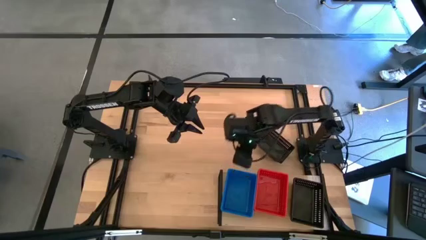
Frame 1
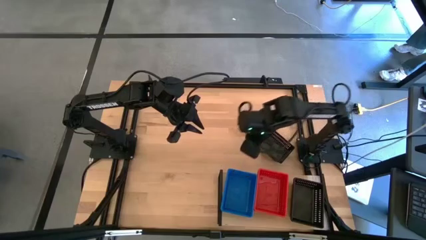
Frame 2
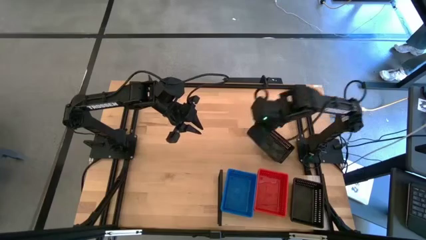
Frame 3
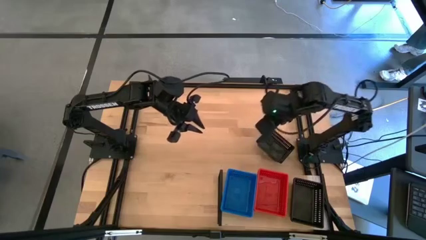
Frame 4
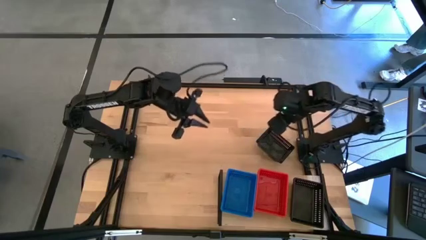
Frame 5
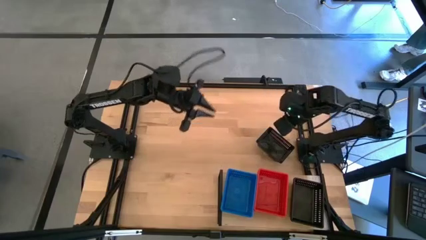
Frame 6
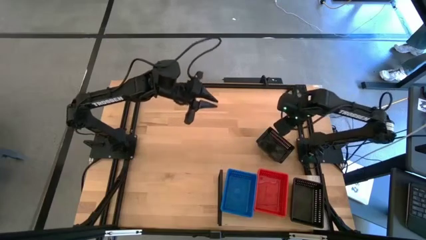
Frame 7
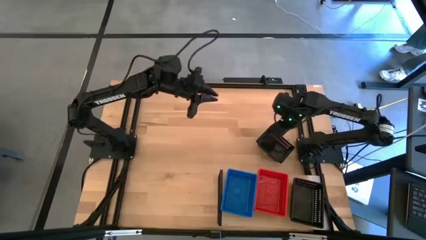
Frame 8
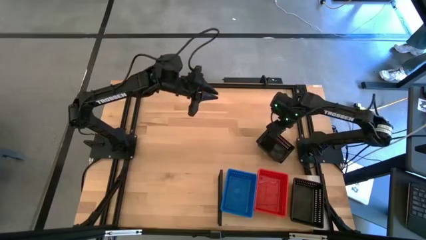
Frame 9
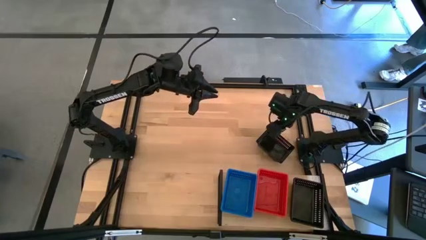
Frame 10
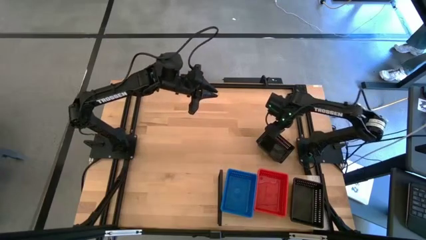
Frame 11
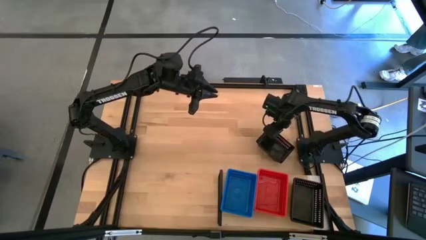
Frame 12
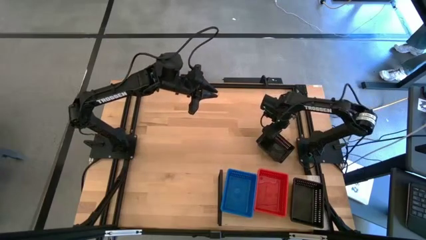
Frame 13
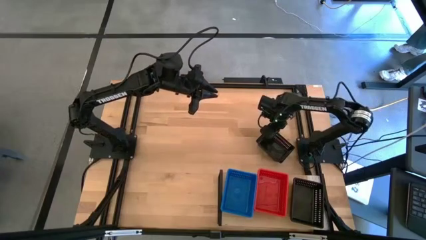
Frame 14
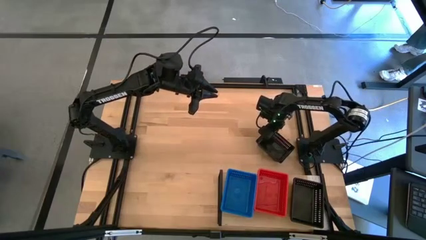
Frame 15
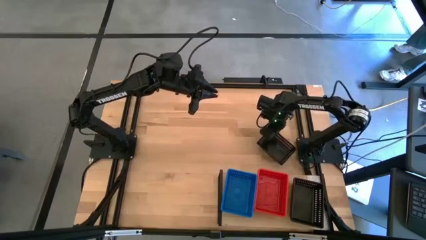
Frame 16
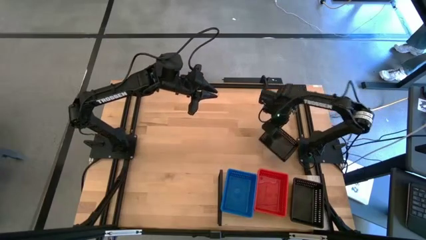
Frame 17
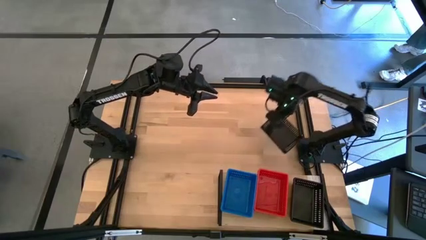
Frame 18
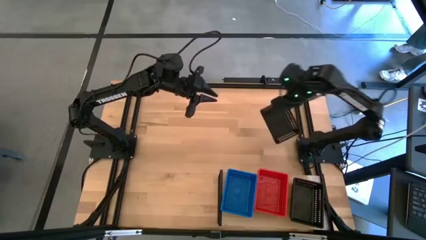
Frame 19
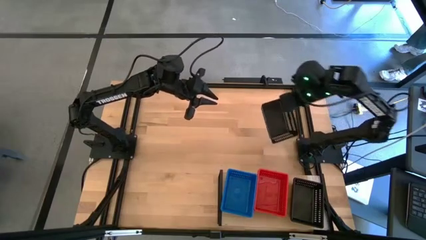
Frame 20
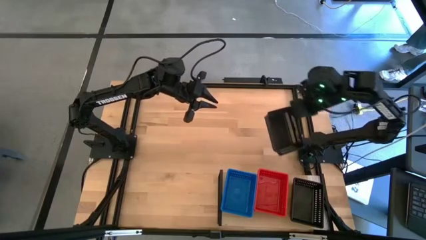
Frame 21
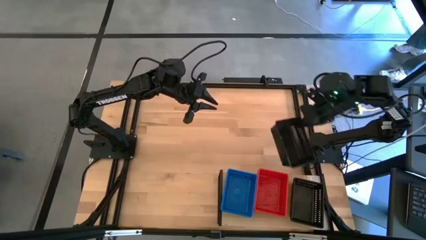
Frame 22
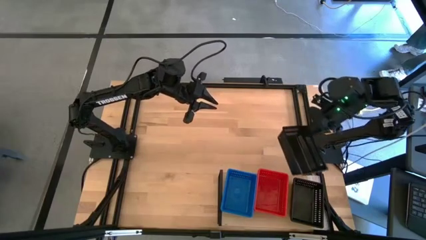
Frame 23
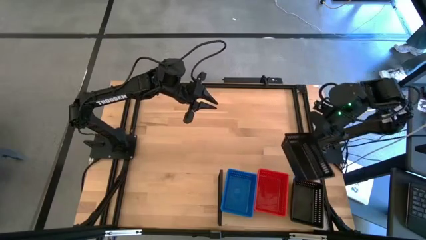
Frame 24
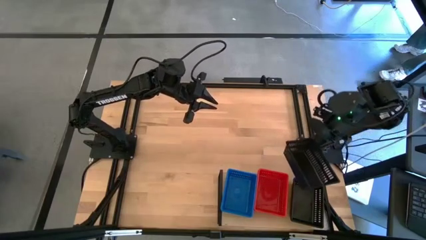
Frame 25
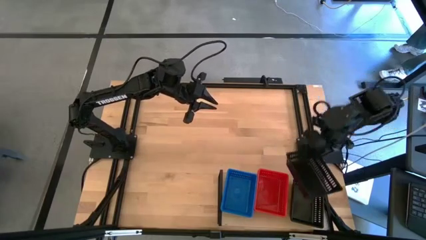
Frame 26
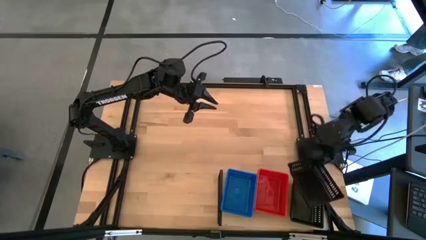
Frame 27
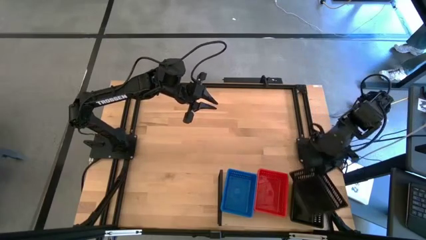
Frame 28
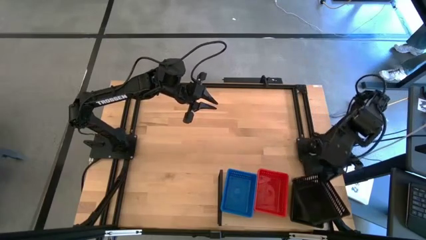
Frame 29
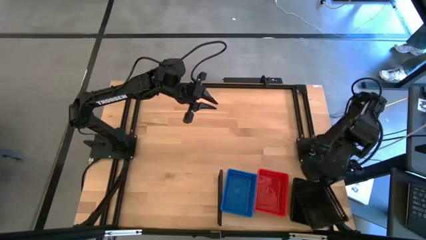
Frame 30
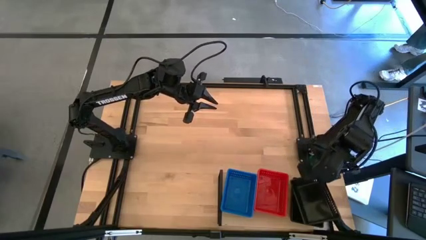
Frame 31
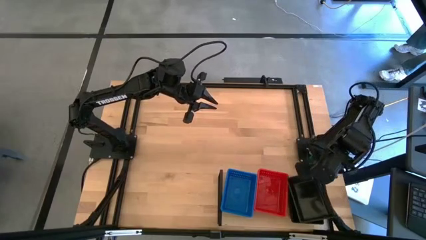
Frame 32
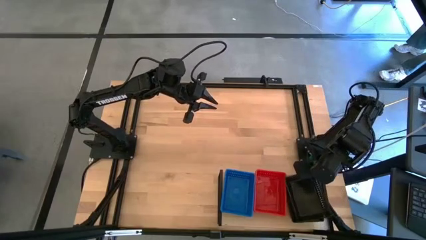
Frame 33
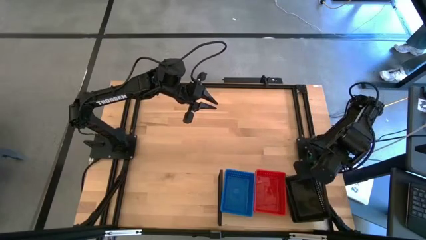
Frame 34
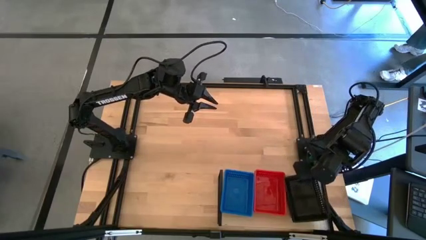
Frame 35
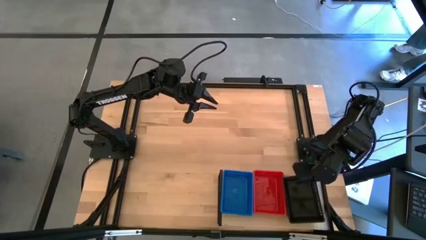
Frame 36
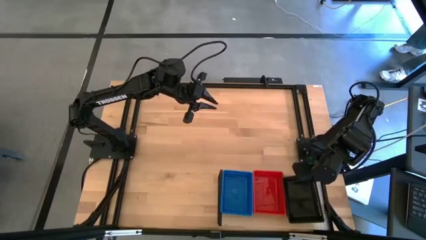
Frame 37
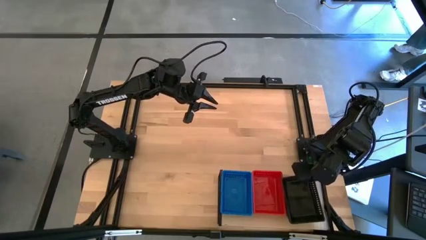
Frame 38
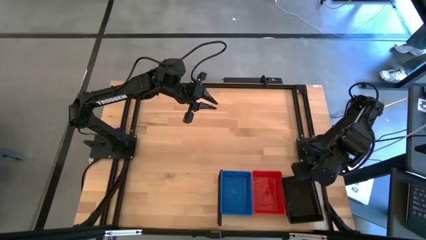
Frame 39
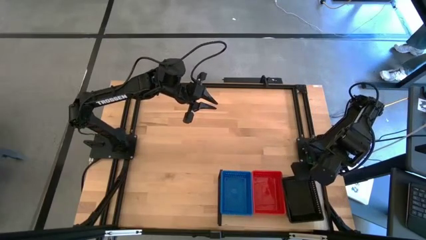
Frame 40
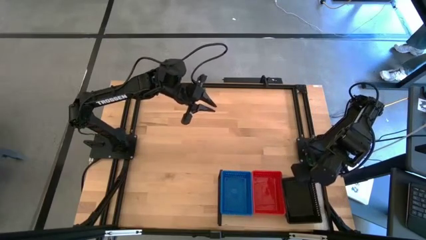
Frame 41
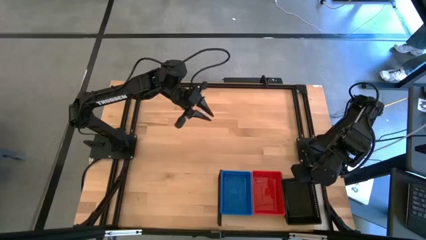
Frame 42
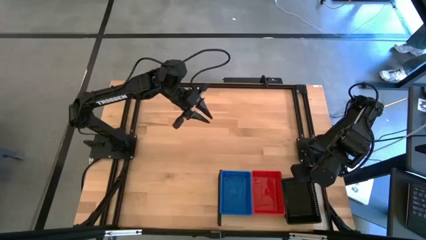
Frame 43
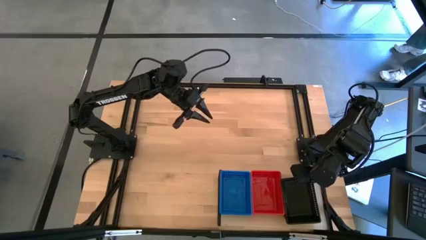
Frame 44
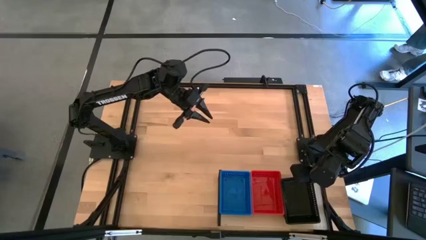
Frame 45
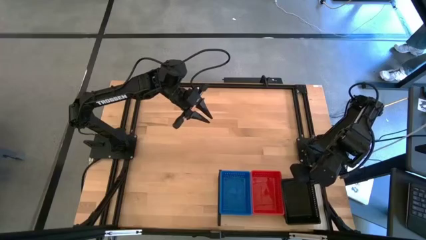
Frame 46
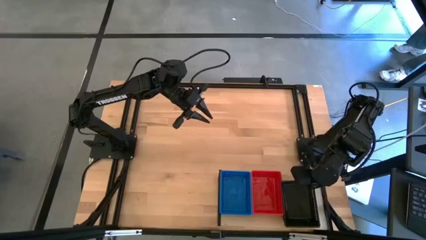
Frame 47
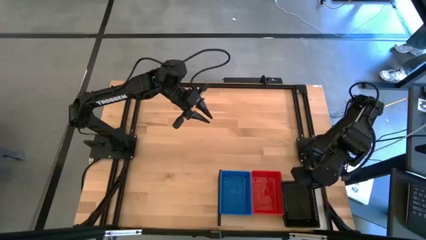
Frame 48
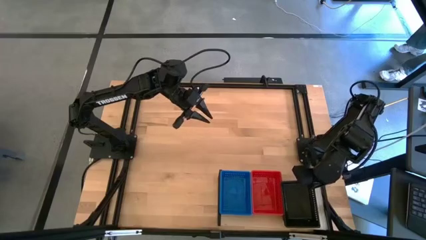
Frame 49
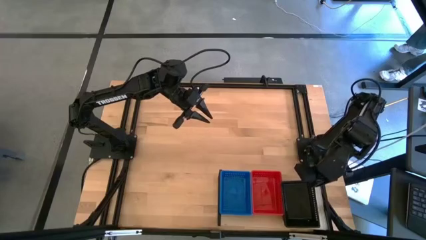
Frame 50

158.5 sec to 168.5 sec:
Task: Stack baskets on shelf by color
Stack the black bin on top of the black bins on the shelf

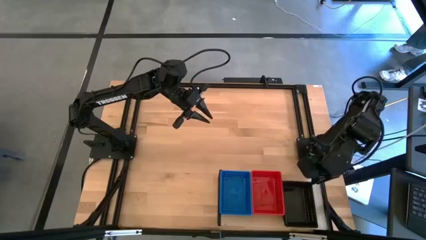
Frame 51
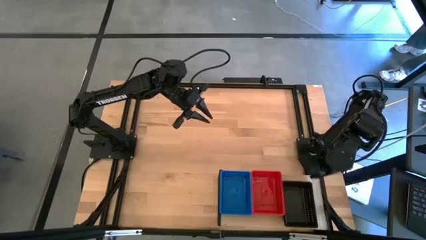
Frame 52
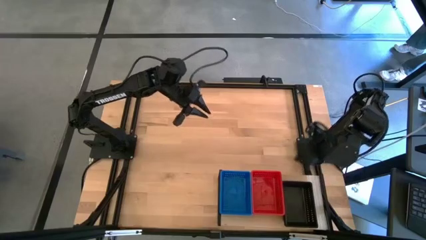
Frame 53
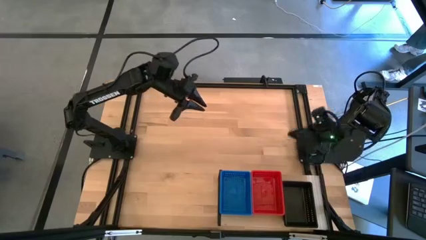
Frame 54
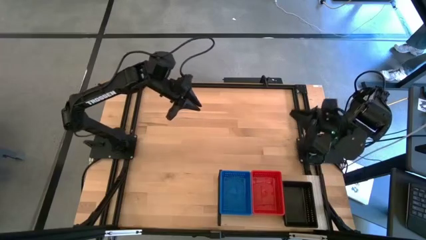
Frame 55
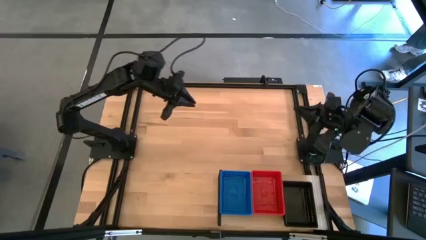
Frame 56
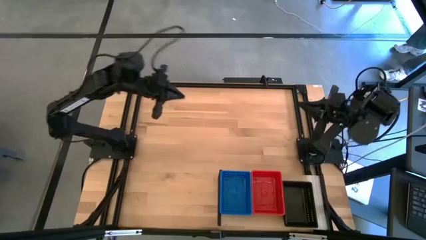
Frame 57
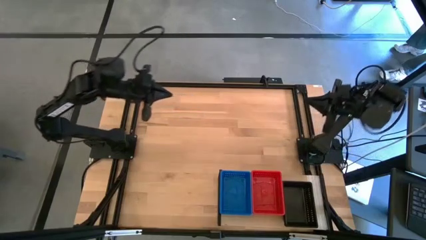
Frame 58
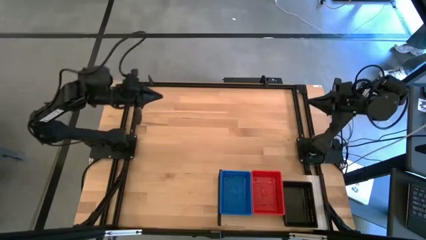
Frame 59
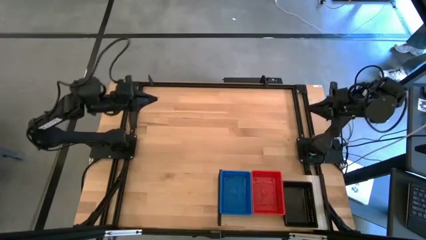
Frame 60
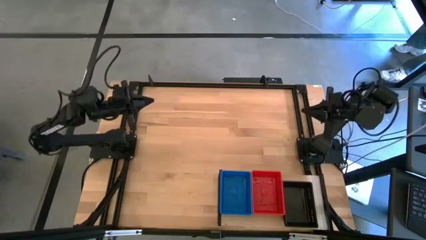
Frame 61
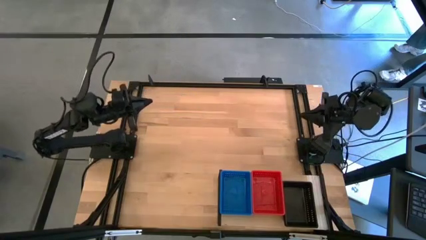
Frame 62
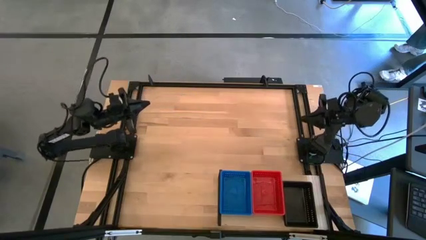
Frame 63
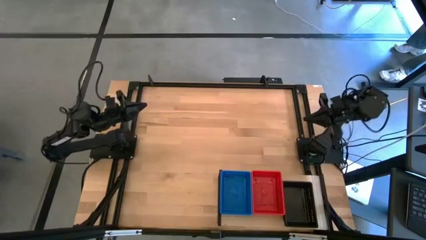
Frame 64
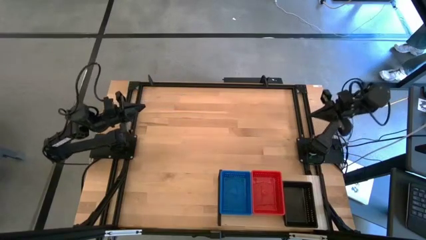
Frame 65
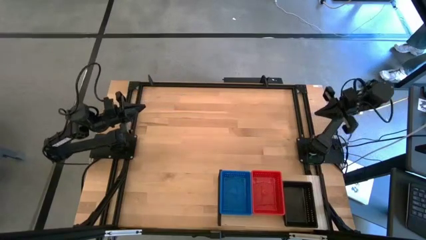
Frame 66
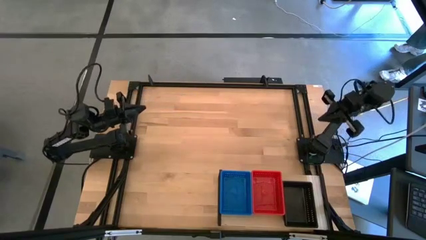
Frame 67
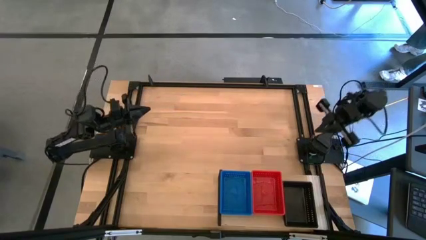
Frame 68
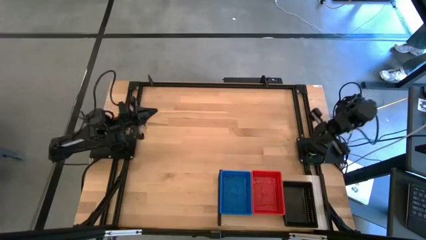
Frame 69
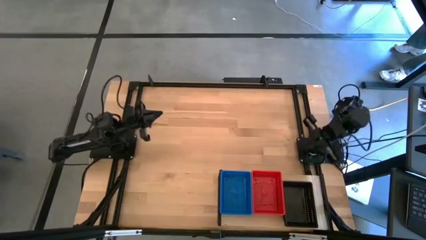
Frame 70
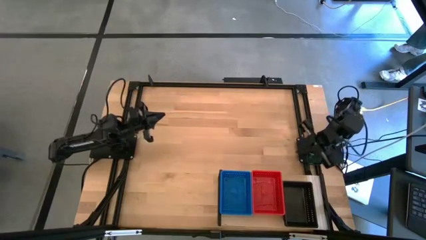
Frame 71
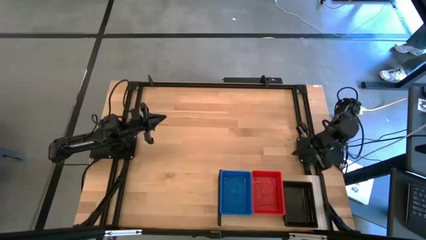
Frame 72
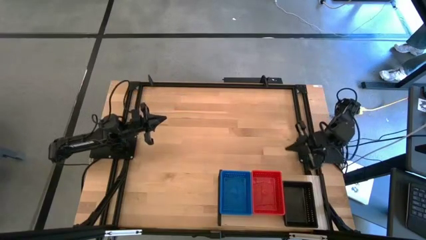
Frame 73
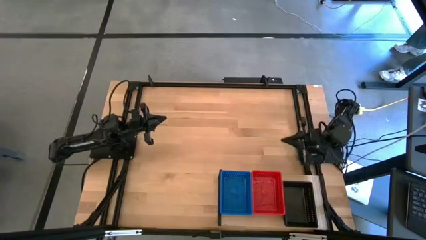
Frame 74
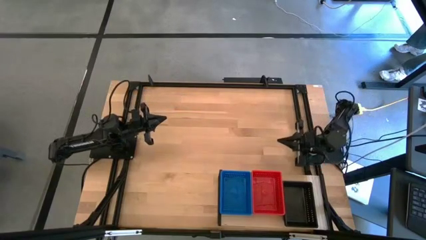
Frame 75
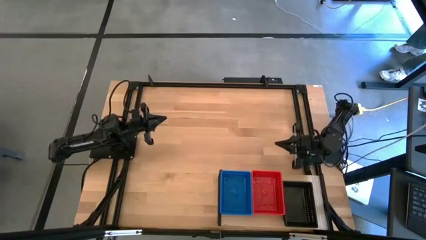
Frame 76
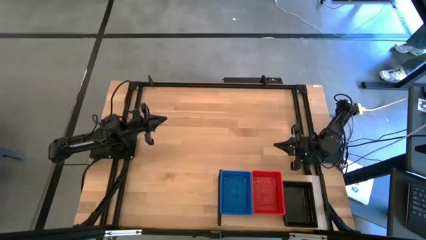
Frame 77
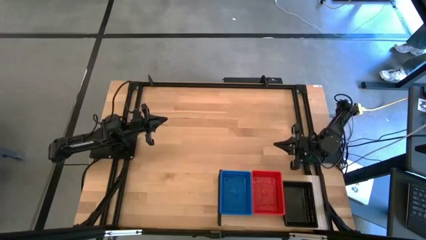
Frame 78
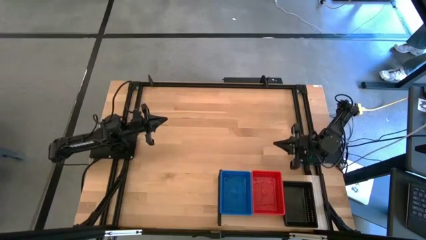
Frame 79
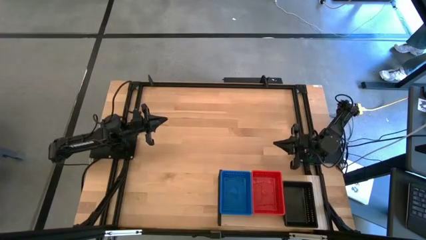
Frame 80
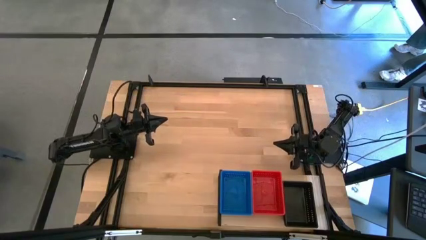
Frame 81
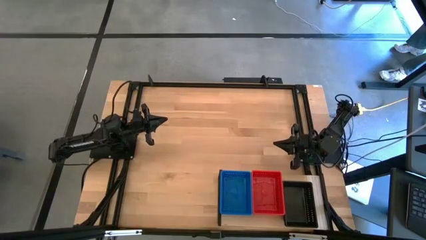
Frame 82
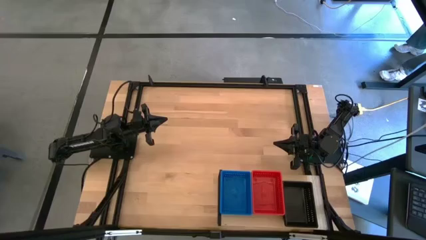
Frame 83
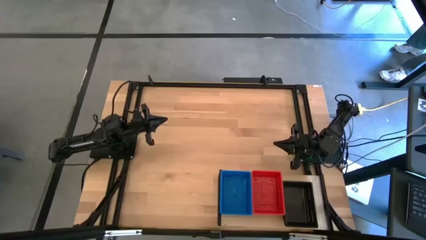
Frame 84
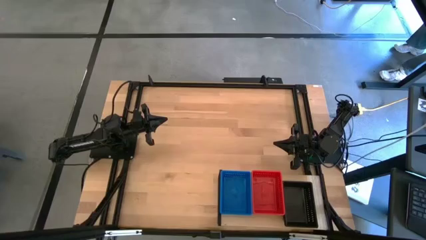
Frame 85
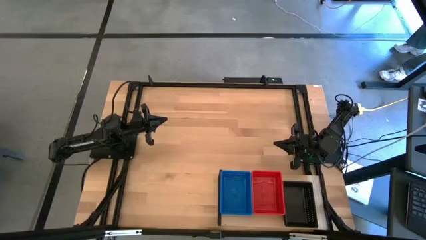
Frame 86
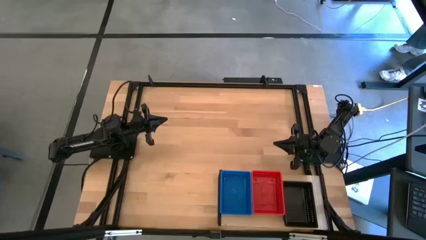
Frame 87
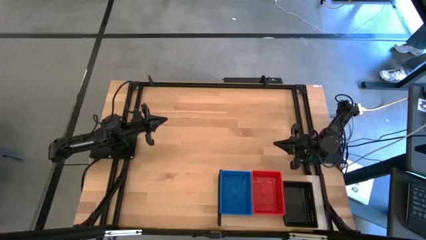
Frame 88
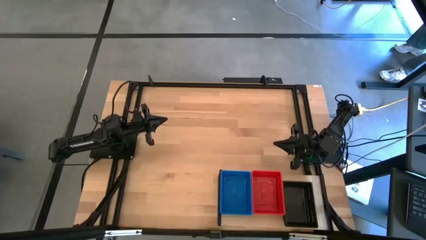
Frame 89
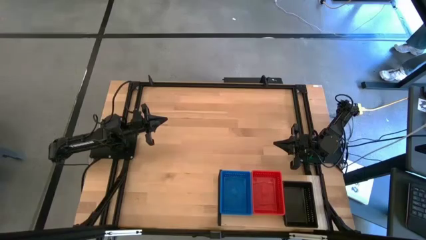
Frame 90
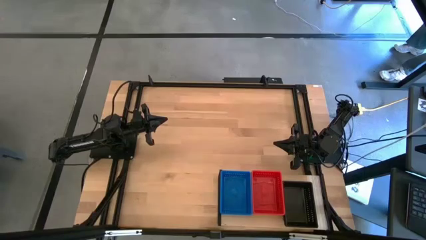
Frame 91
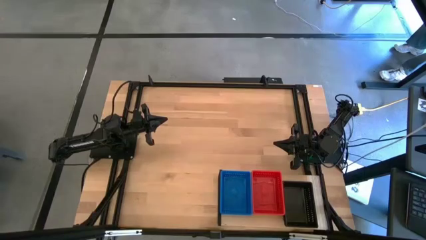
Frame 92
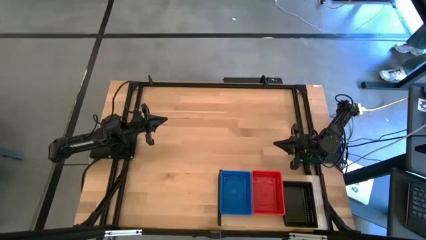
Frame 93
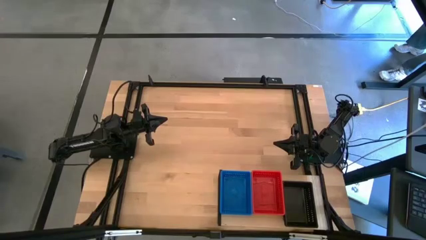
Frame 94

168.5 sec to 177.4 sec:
Return to Home Position
